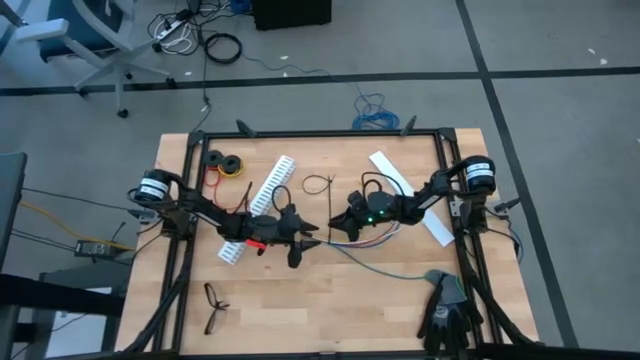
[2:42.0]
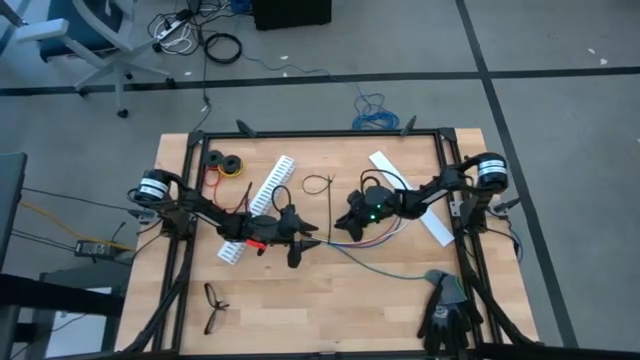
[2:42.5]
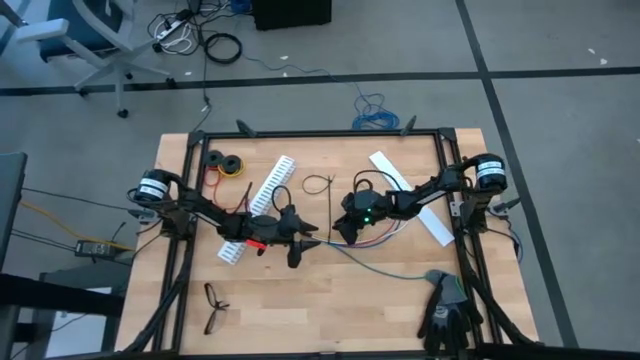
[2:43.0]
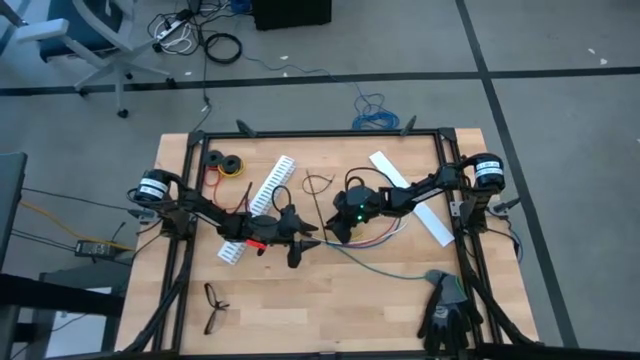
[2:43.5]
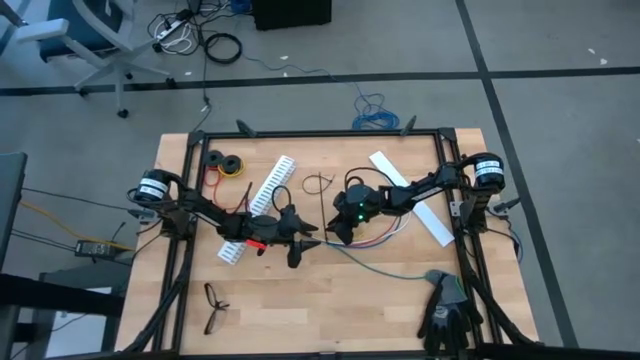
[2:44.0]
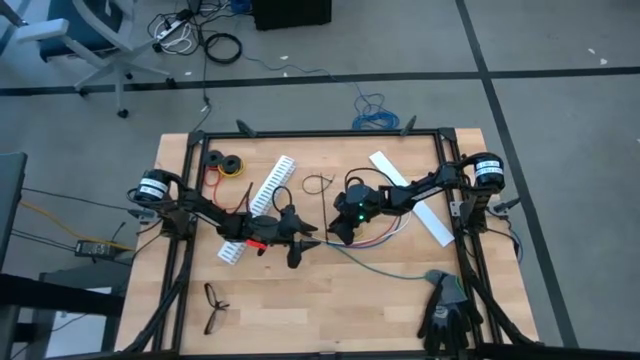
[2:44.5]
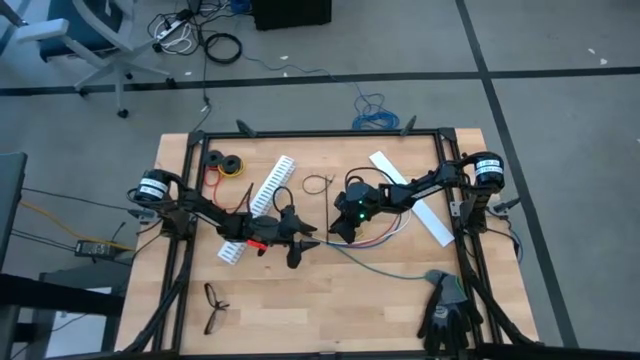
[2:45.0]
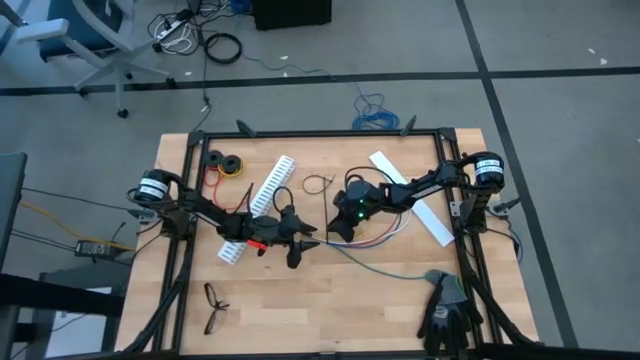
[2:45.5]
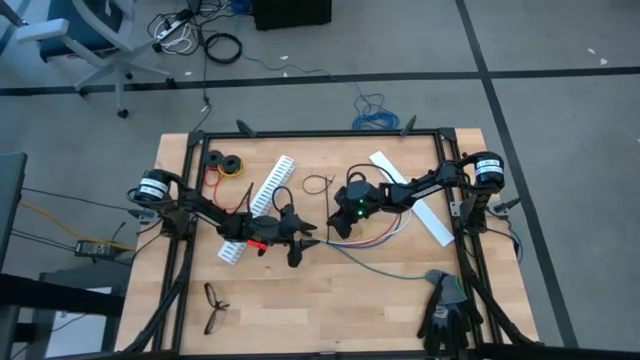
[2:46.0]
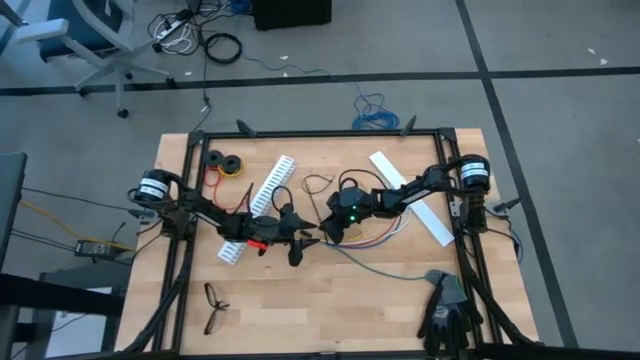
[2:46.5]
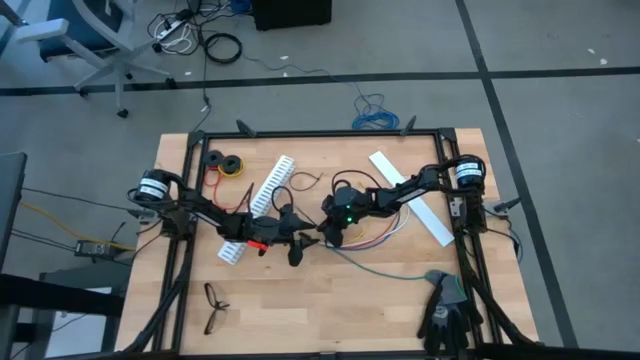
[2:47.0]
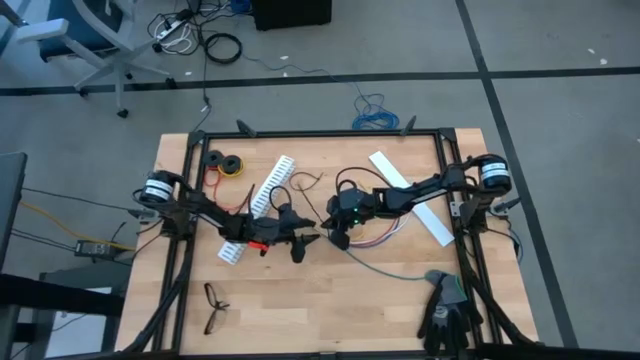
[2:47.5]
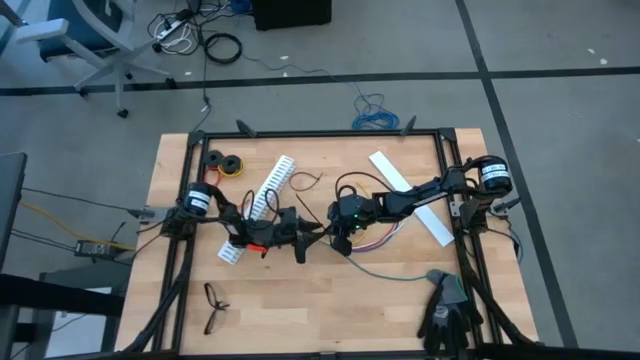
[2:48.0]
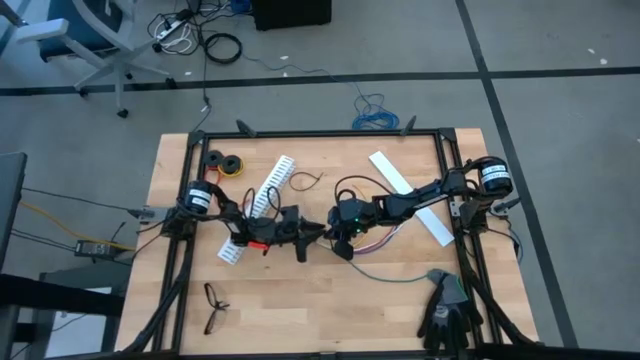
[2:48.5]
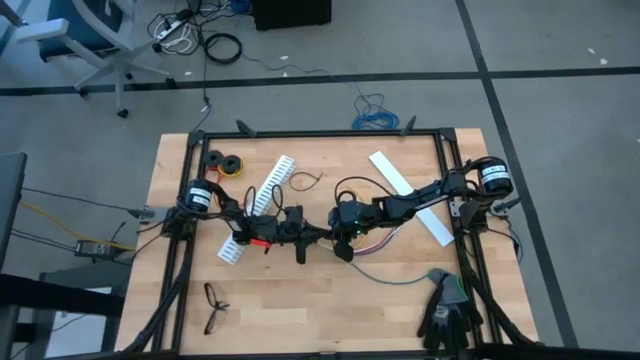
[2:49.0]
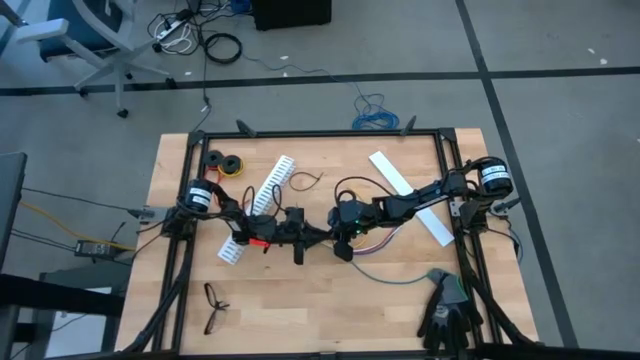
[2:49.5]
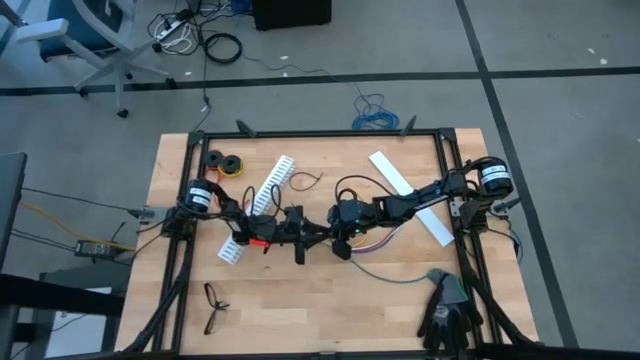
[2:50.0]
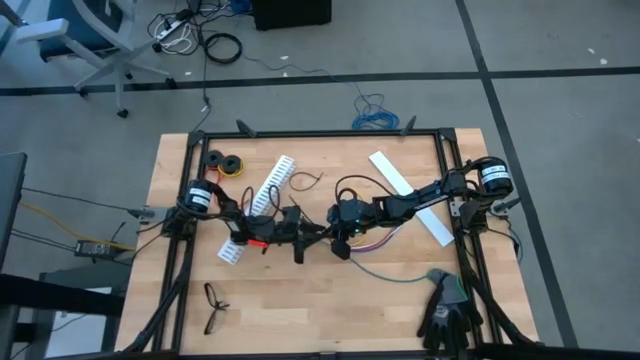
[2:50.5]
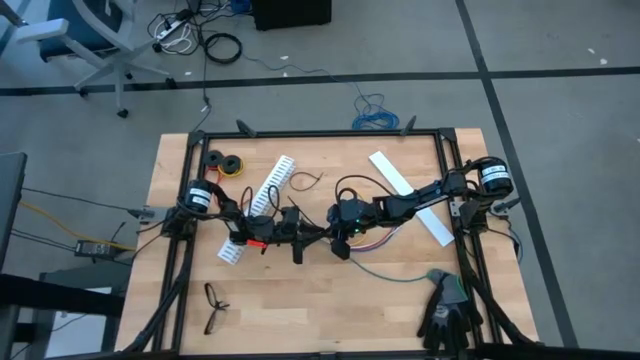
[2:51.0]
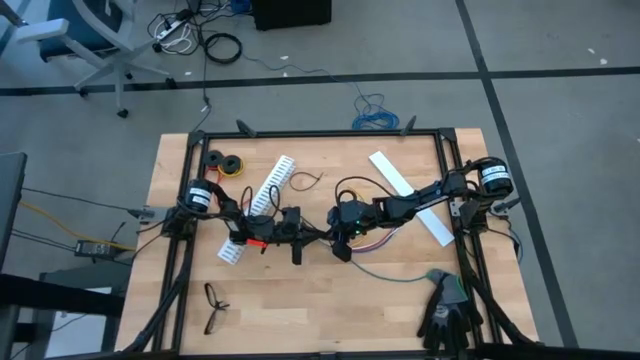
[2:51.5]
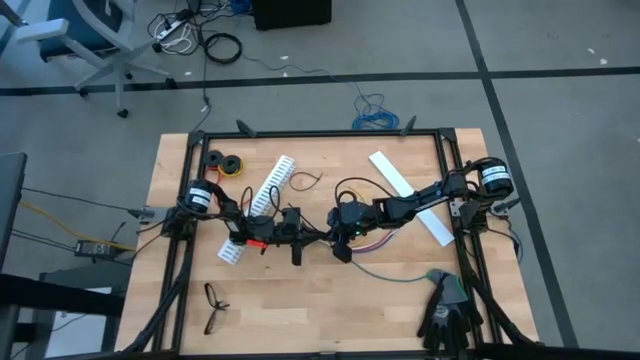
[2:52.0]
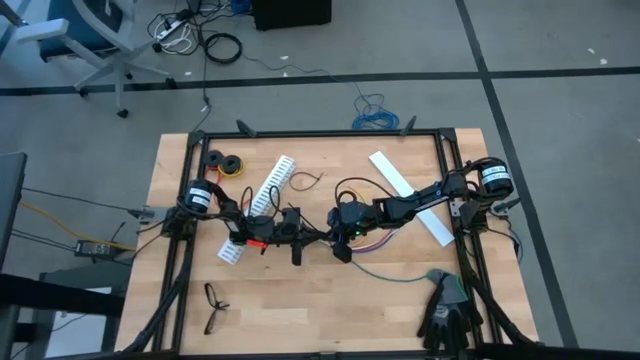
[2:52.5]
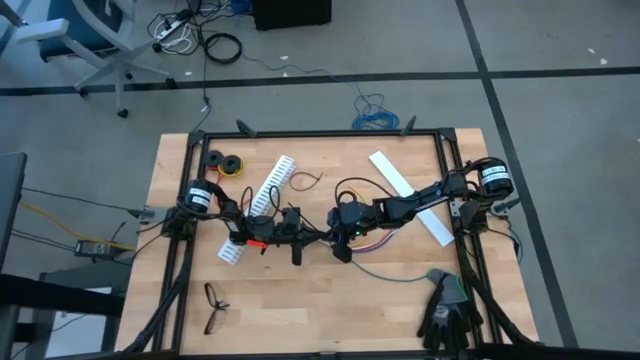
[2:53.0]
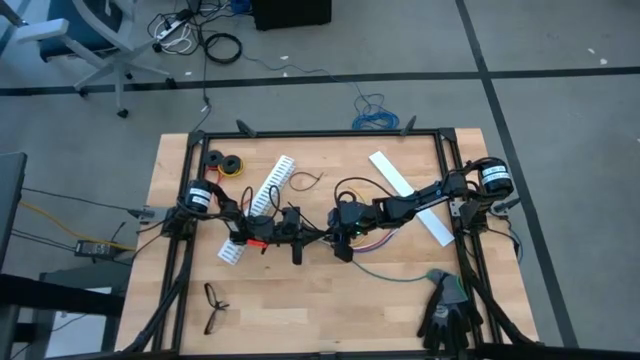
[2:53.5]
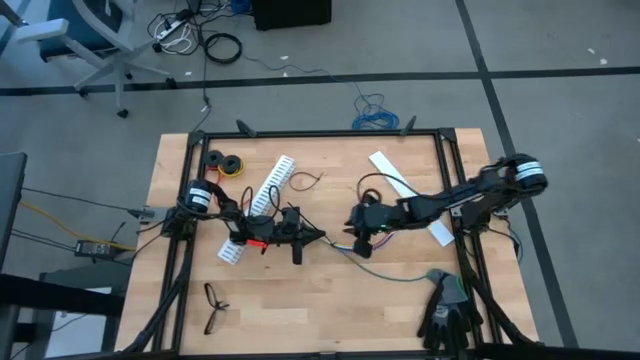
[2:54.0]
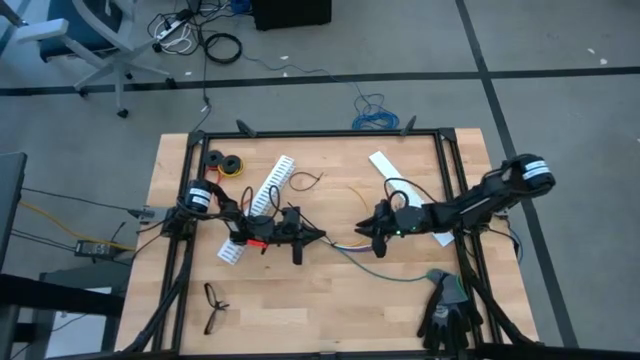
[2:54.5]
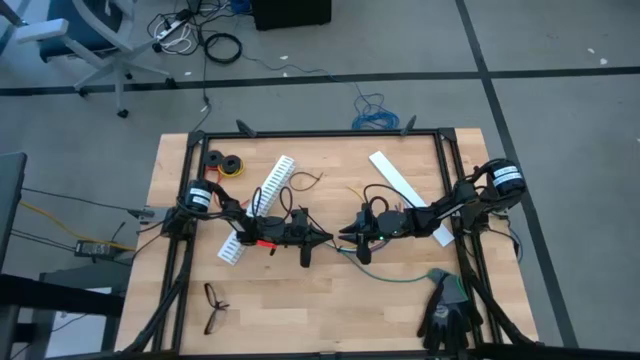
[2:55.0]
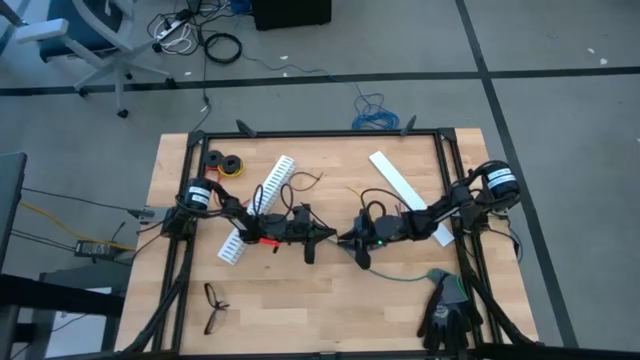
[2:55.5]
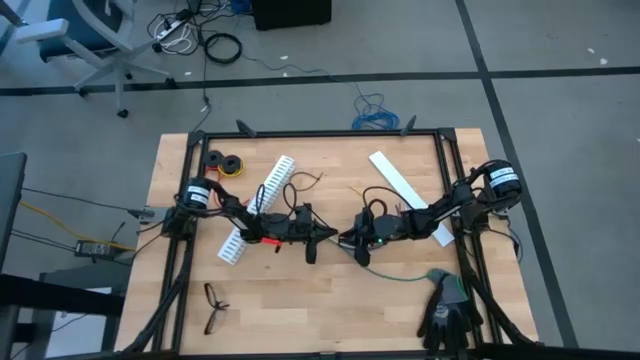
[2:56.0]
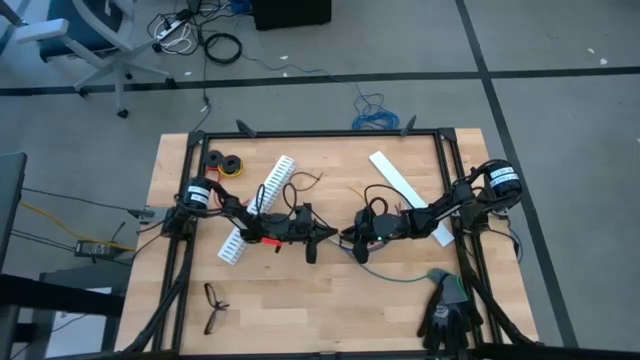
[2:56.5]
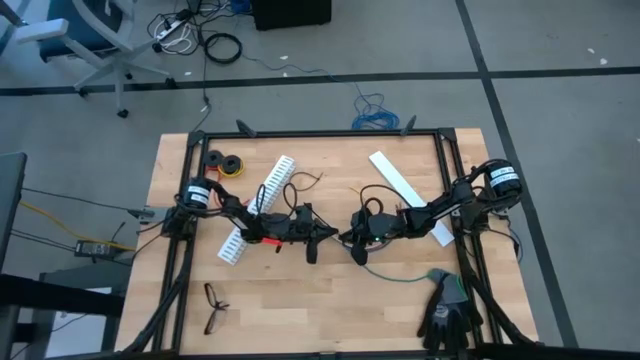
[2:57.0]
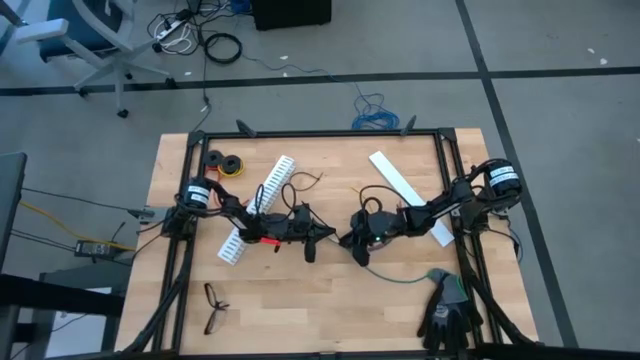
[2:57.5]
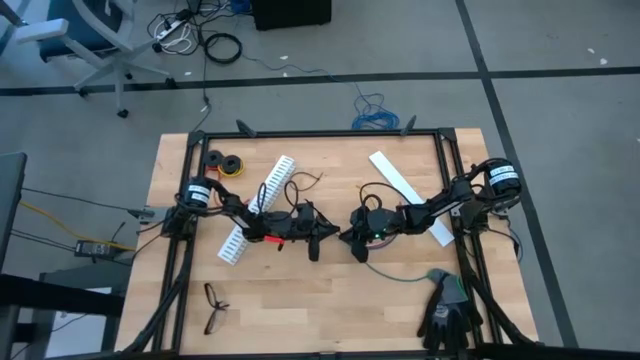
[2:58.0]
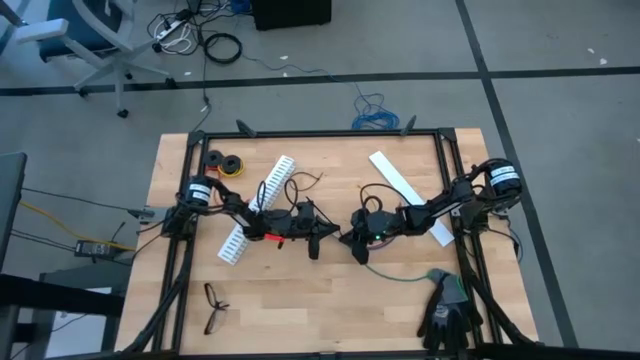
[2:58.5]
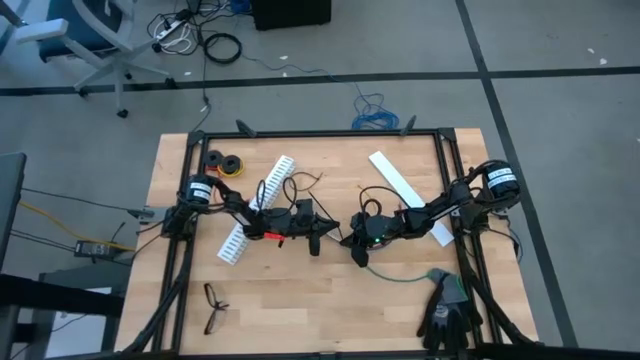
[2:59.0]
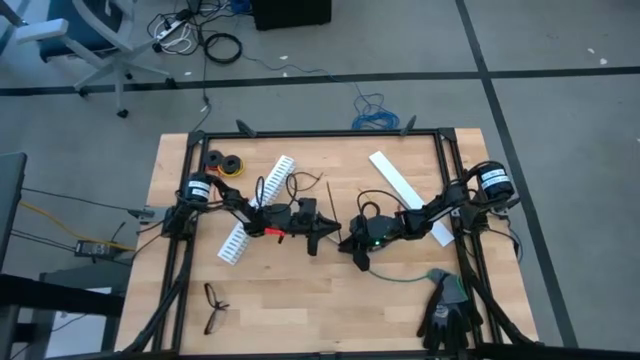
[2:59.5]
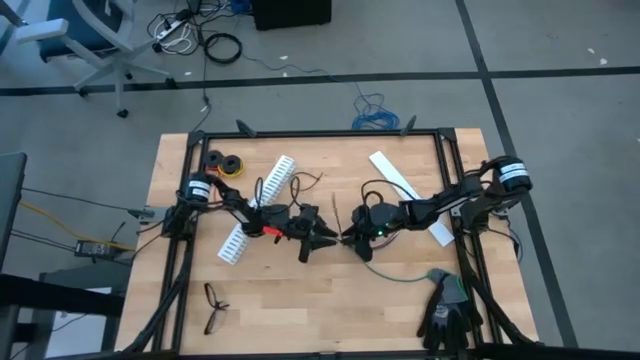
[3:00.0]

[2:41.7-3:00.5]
Task: Ziptie cables
Wrap the cable wires with the black zip tie

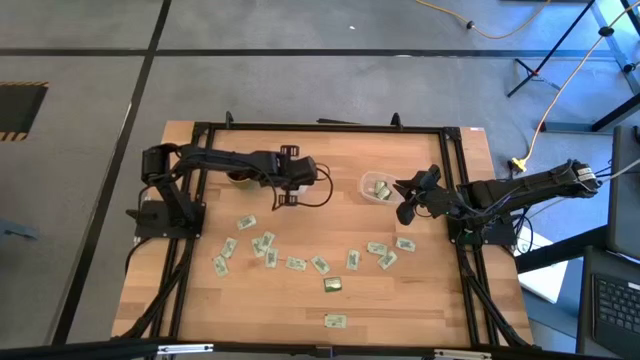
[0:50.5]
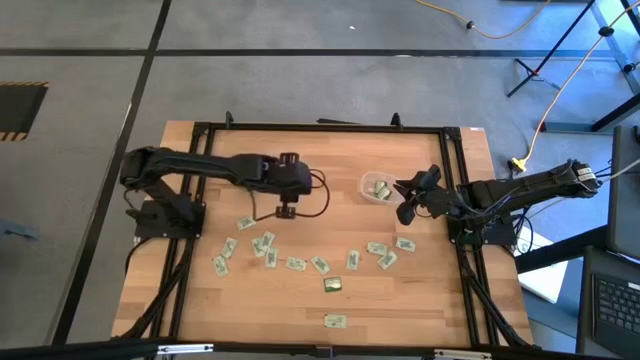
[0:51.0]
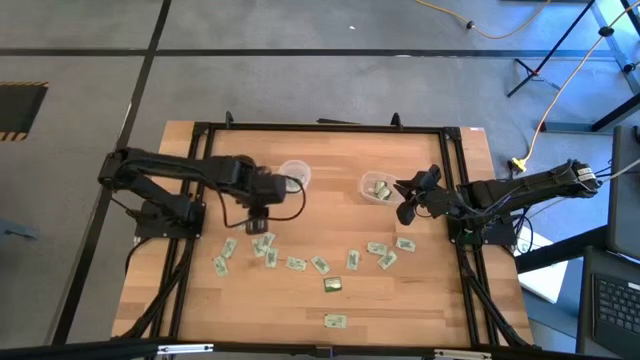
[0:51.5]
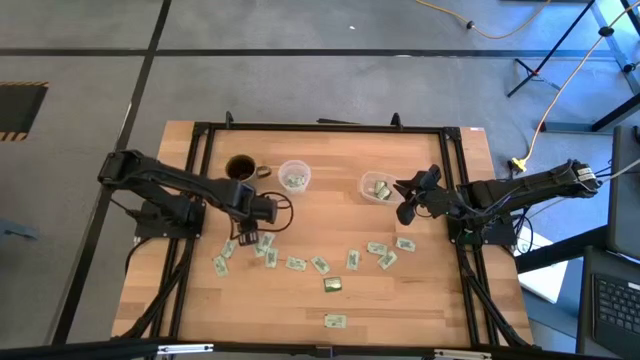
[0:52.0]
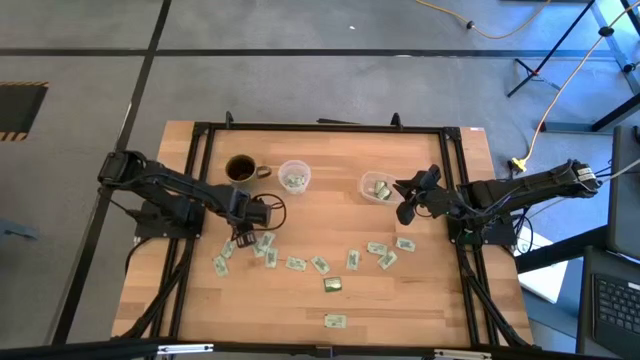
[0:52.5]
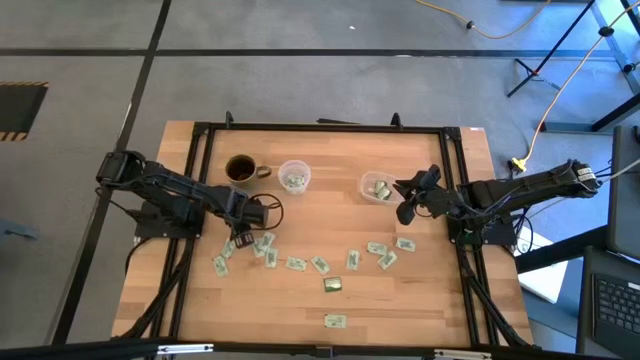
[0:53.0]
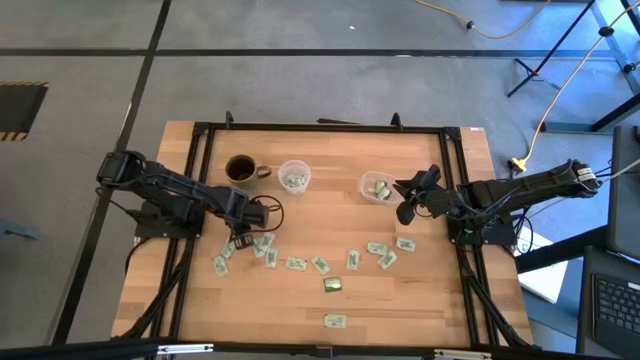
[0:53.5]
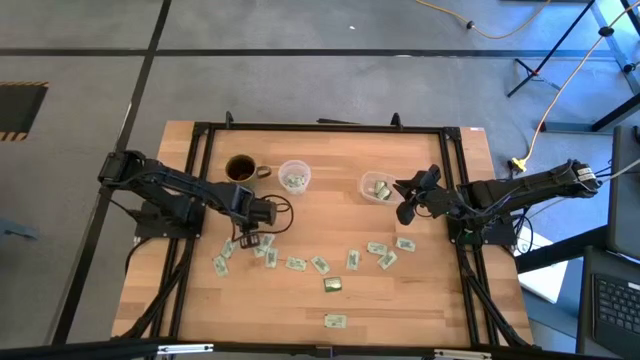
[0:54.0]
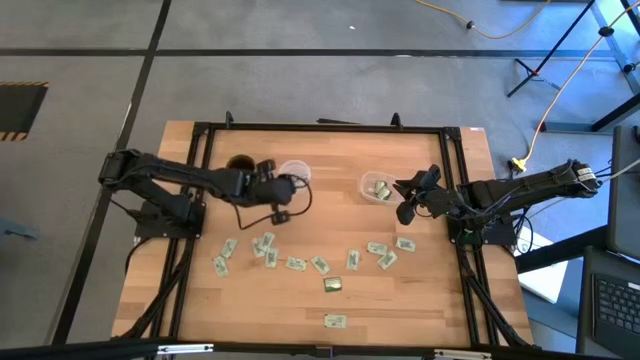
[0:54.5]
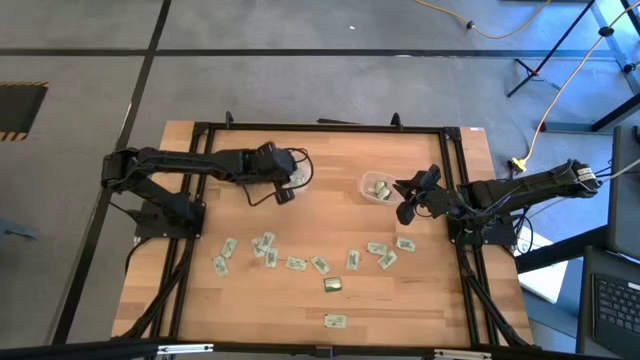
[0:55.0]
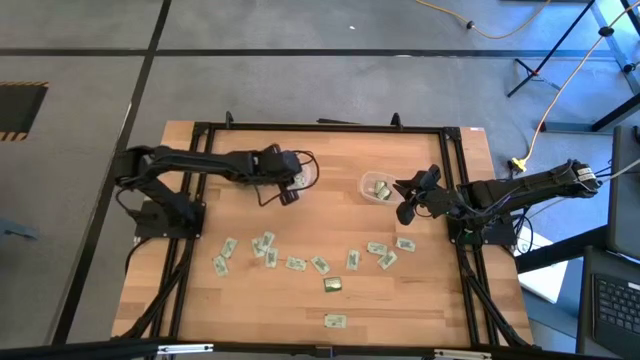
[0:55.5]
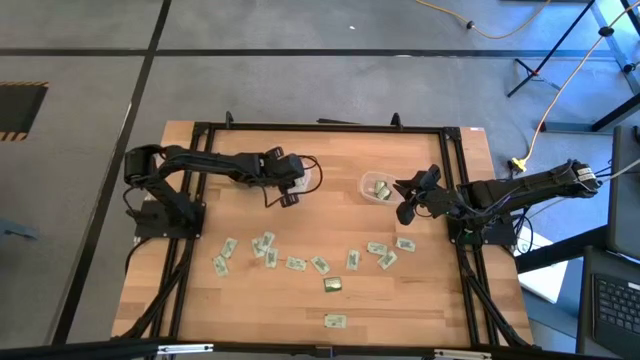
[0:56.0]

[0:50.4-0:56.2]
Task: Pick and place items into bin
Put the white stevia packet into the left transparent bin
